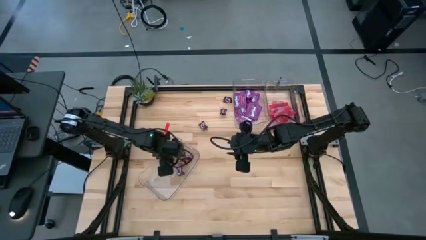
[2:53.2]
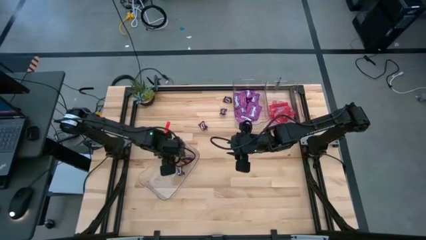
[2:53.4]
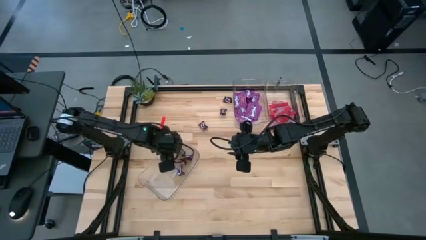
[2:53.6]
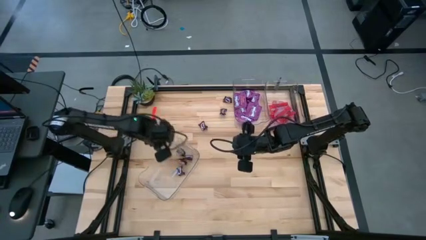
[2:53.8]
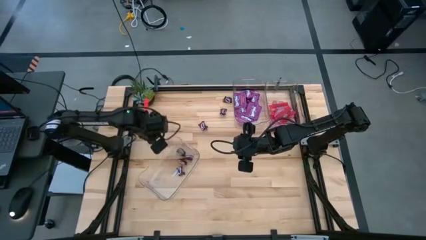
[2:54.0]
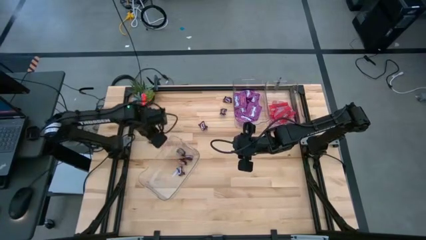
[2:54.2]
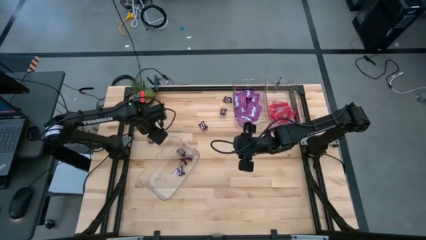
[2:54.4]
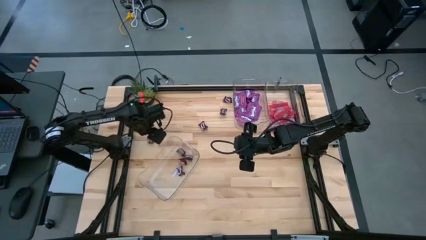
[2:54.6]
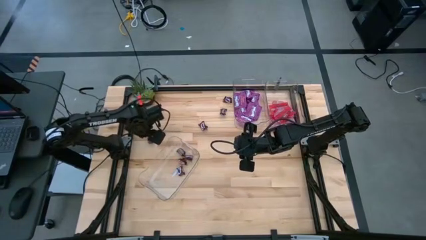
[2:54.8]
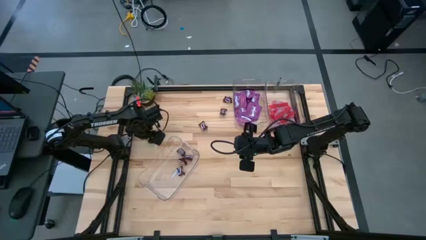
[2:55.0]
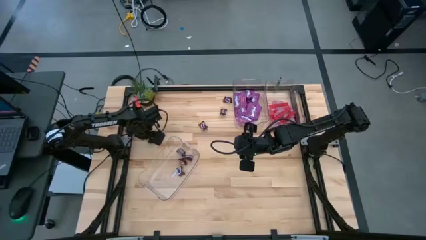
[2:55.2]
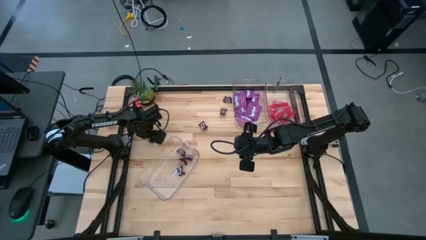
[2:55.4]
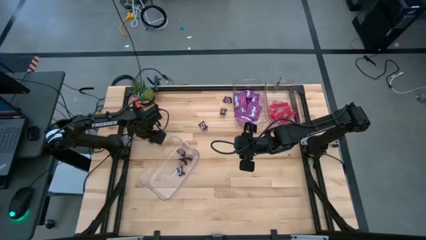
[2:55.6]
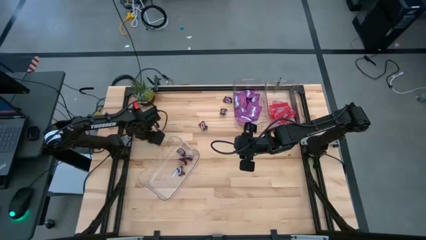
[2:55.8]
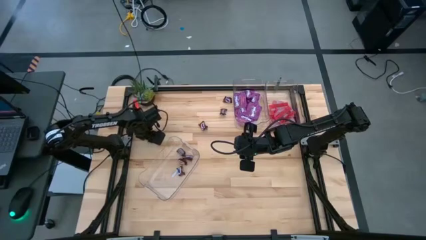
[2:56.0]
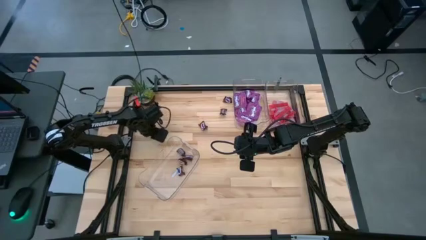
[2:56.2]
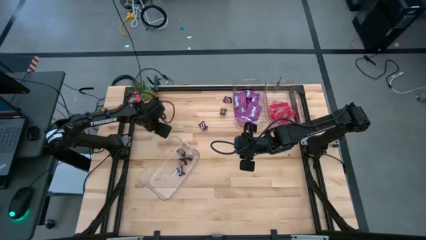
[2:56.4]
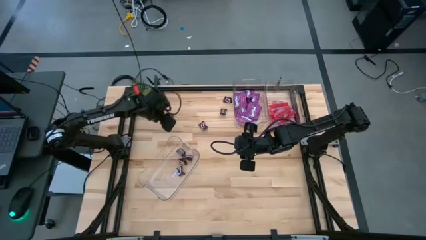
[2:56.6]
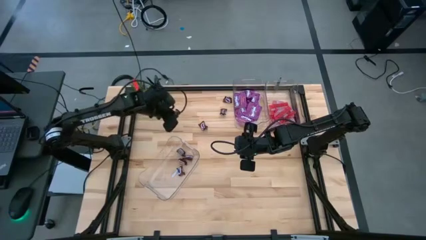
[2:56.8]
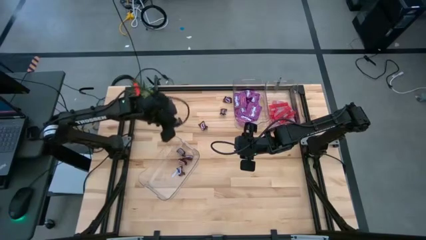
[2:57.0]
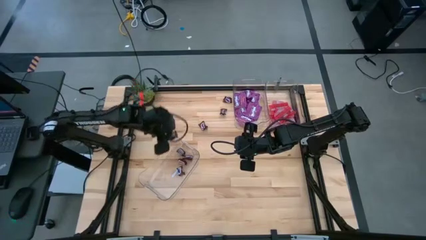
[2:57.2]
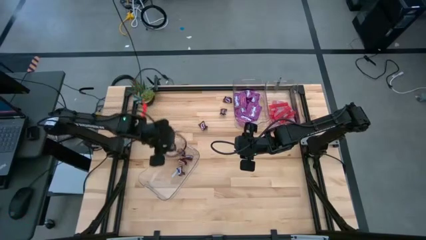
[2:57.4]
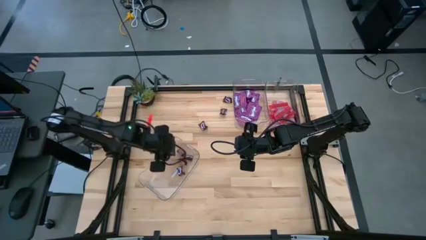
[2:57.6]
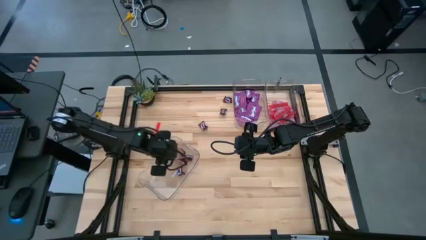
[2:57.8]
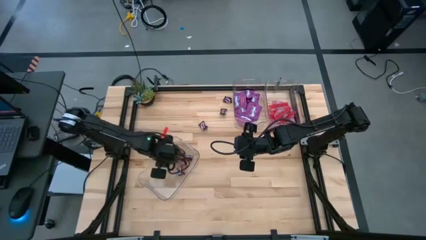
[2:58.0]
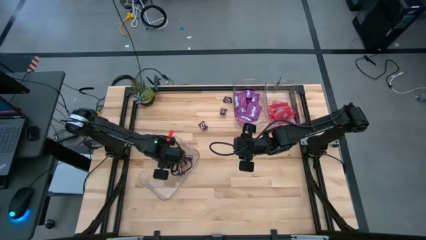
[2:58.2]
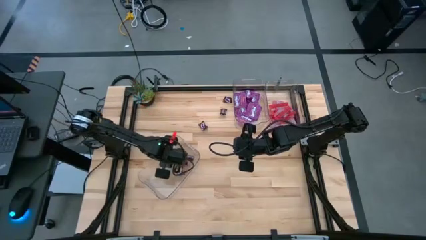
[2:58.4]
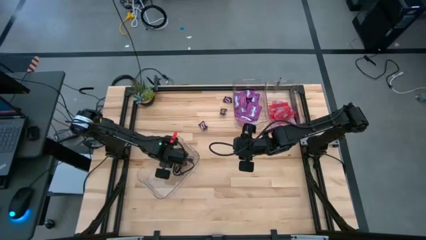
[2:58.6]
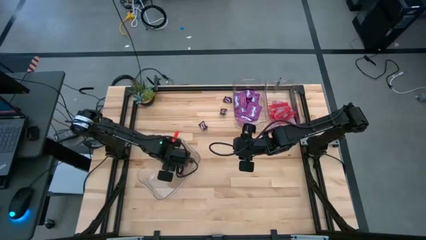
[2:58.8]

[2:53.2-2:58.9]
Task: Sort candy
Put the brown candy into the bottom transparent bin

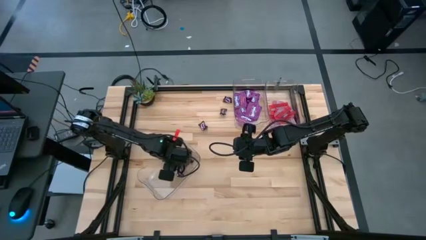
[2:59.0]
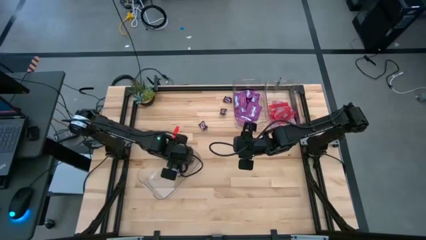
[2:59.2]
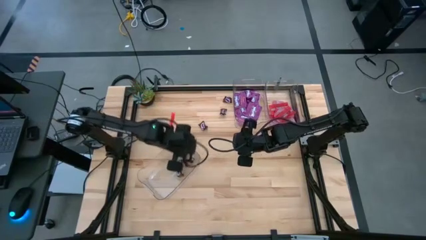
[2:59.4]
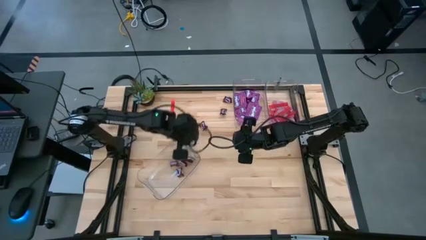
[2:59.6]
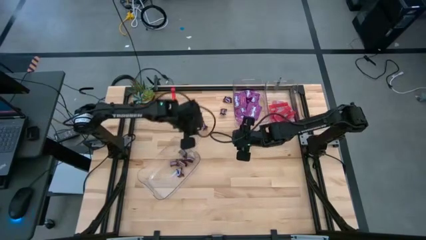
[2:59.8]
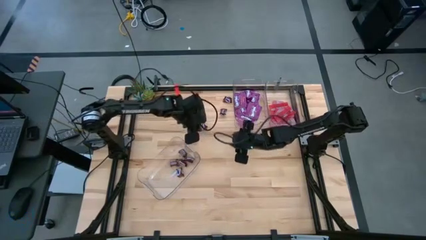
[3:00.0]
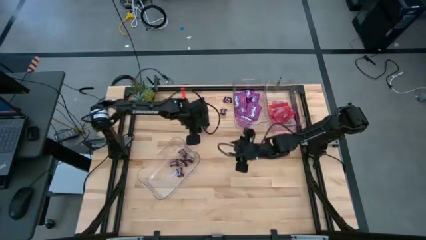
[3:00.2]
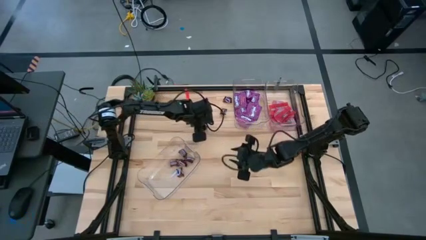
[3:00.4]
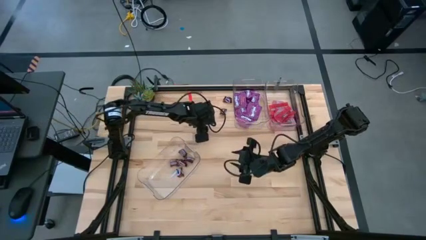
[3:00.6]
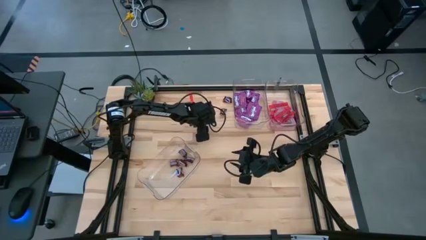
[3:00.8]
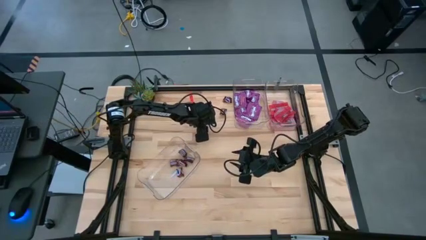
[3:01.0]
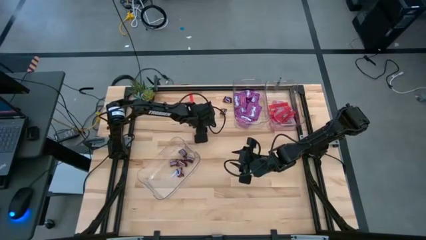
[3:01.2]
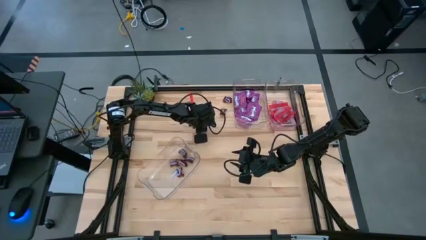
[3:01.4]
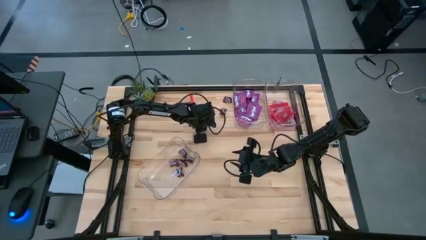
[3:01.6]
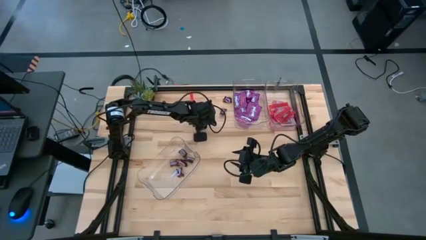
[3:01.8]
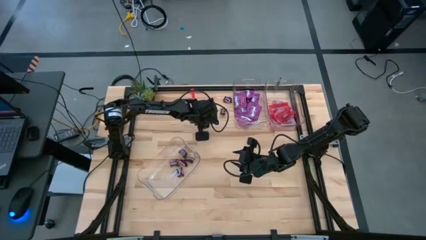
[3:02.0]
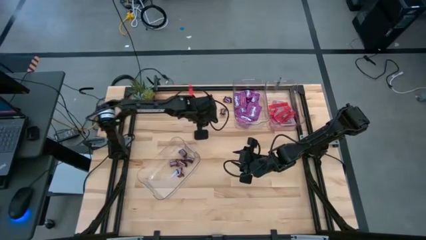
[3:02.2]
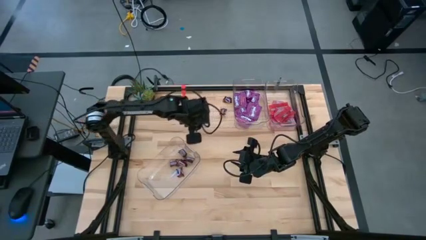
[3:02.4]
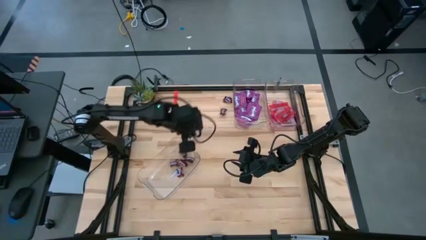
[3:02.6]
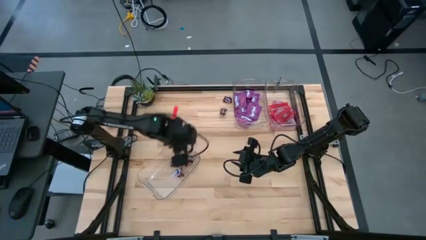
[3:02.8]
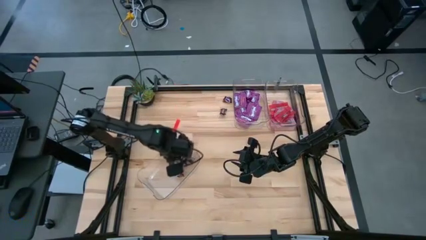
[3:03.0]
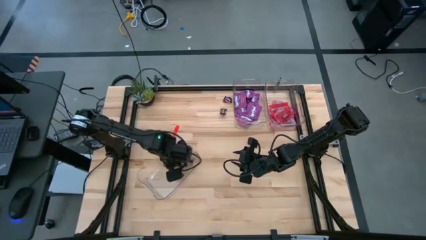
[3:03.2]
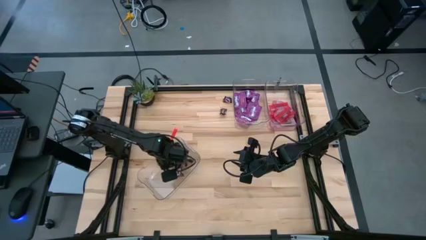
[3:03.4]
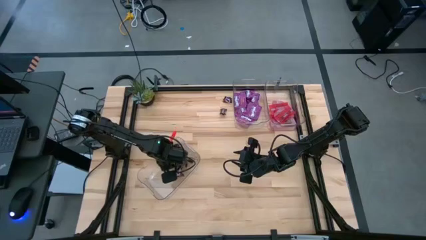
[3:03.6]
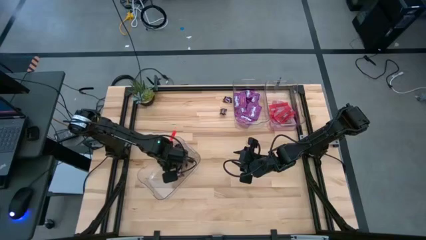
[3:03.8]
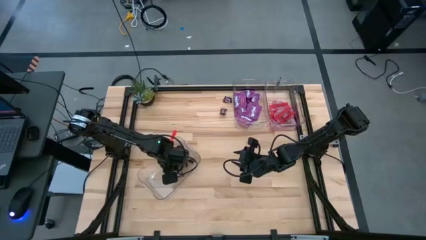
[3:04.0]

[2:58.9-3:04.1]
Put the brown candy into the bottom transparent bin

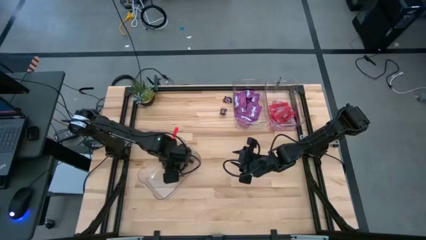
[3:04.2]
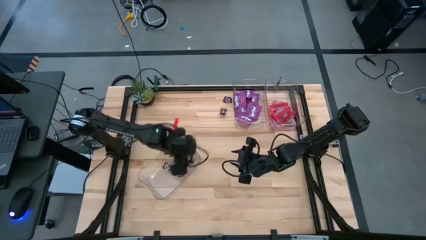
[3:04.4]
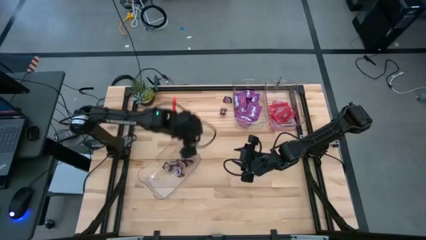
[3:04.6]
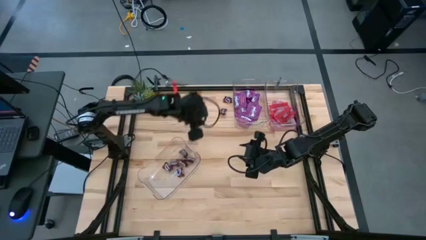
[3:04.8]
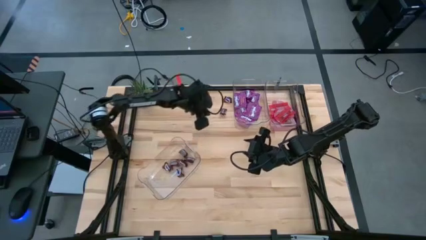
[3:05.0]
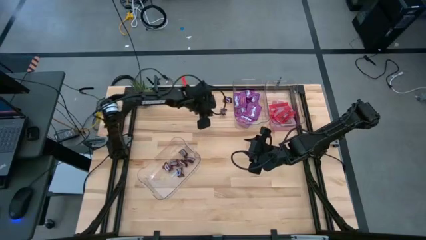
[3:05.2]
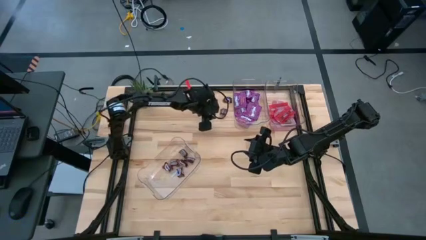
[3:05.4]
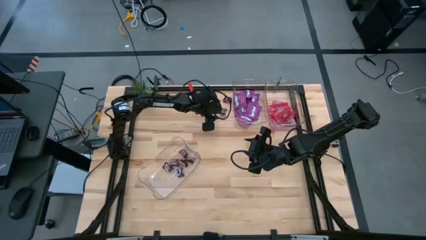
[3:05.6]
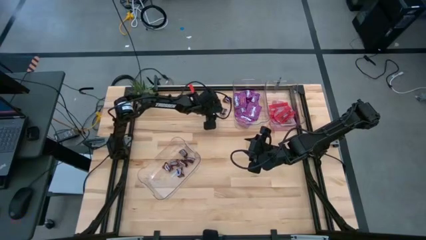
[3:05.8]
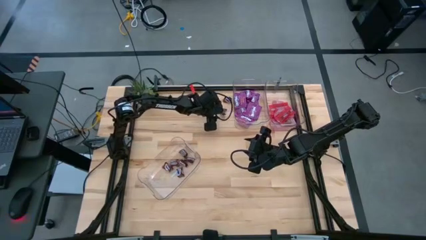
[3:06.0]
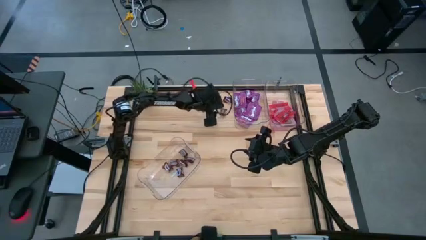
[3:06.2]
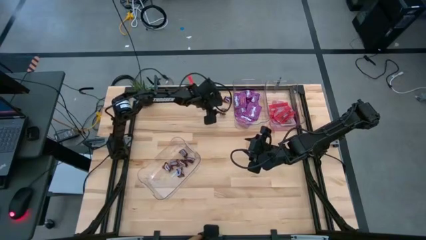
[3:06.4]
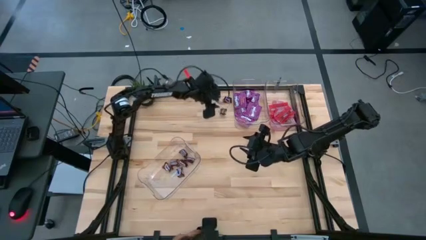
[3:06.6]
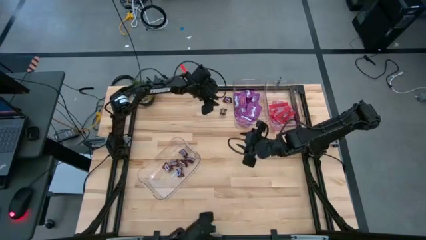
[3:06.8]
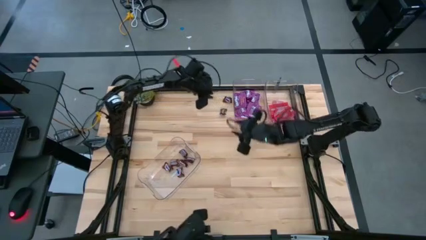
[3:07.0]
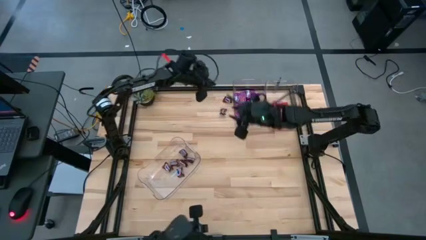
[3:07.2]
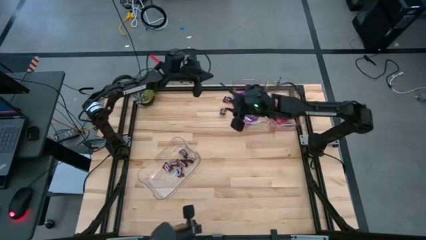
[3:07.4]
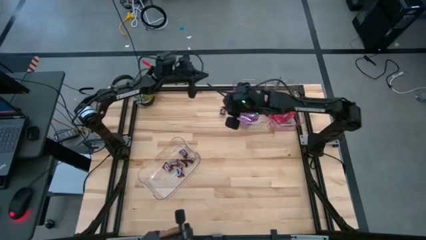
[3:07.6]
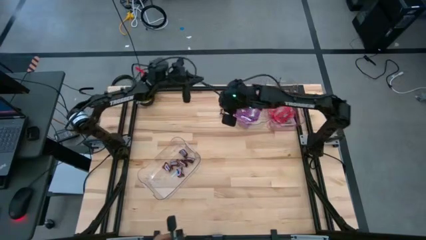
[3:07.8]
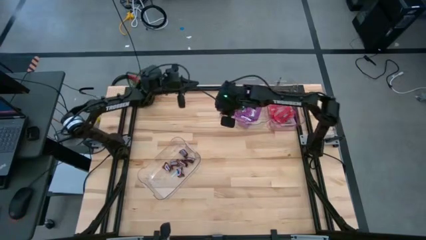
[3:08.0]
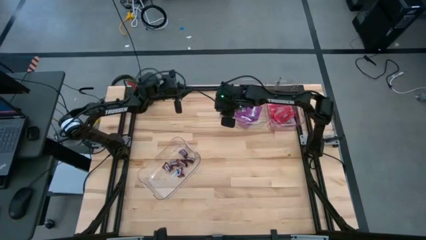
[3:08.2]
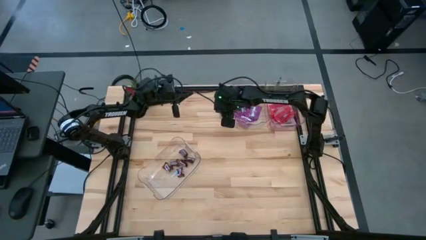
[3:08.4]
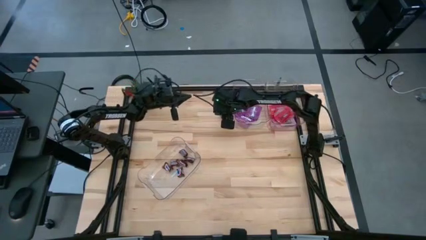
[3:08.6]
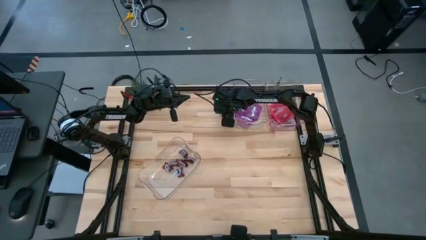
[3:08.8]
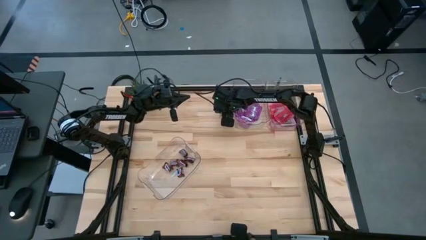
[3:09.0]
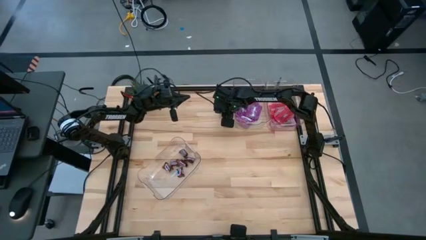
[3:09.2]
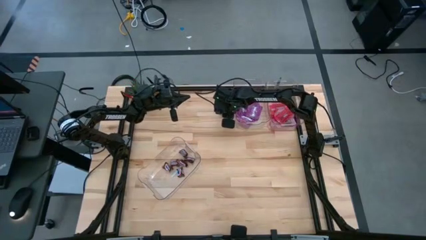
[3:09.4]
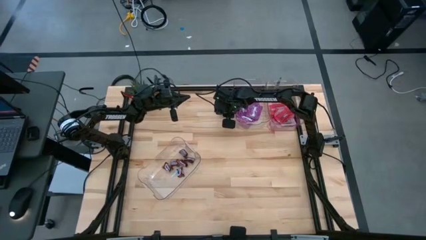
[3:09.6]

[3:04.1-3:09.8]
Put the brown candy into the bottom transparent bin
